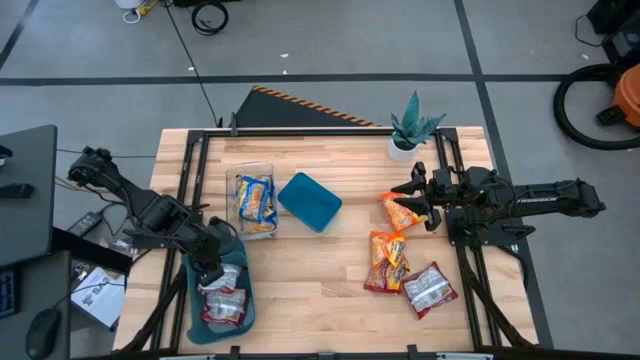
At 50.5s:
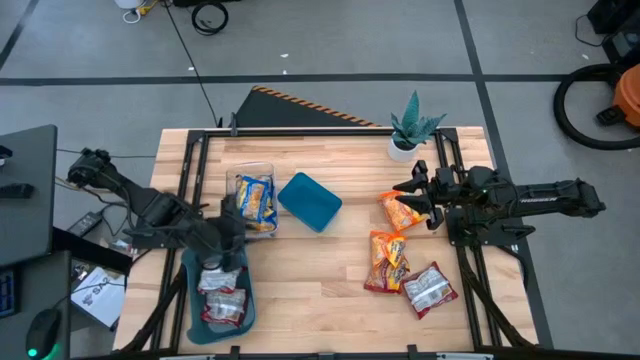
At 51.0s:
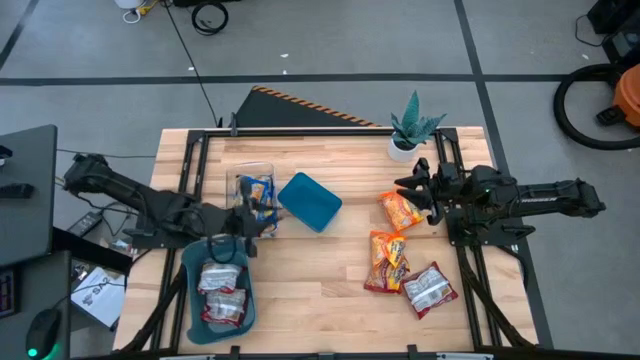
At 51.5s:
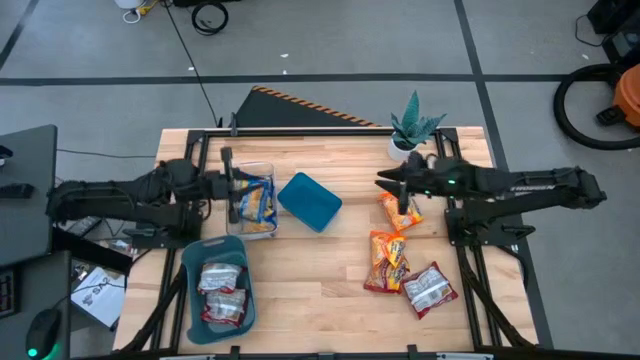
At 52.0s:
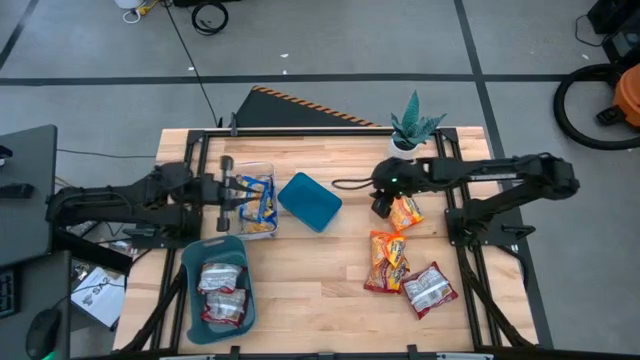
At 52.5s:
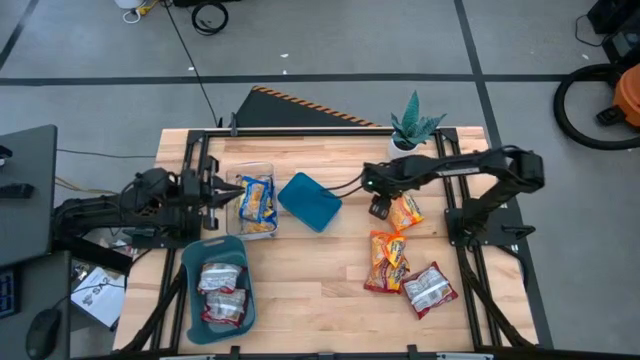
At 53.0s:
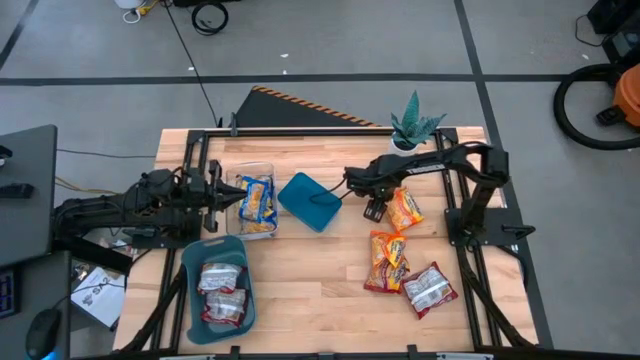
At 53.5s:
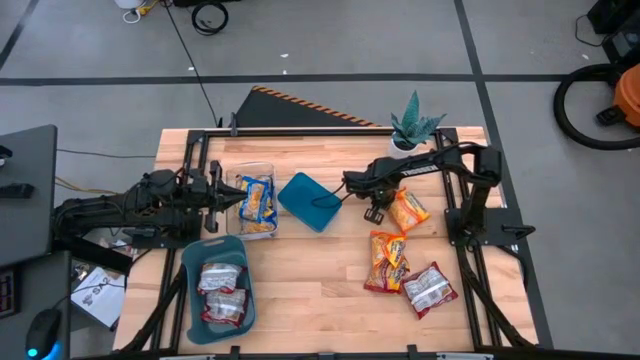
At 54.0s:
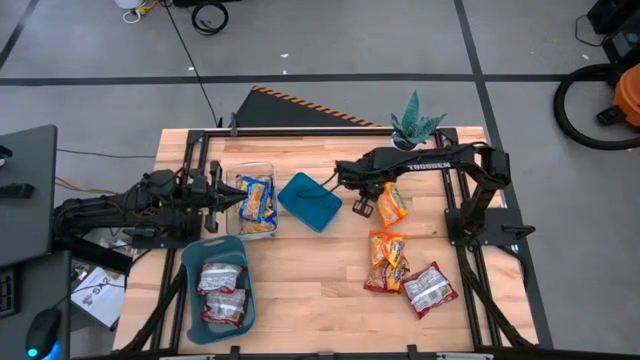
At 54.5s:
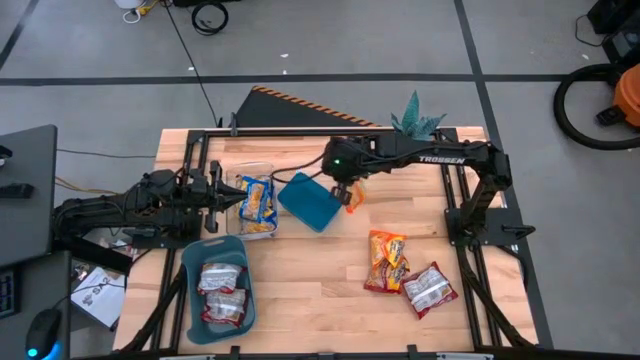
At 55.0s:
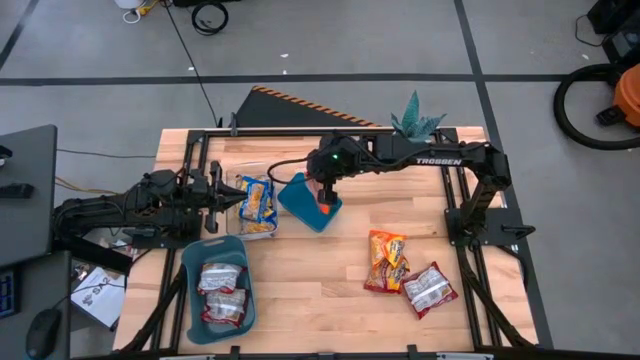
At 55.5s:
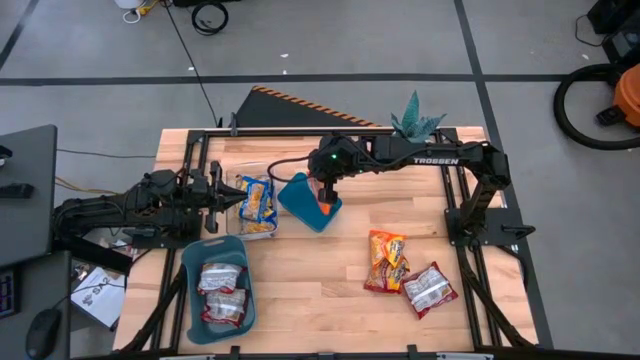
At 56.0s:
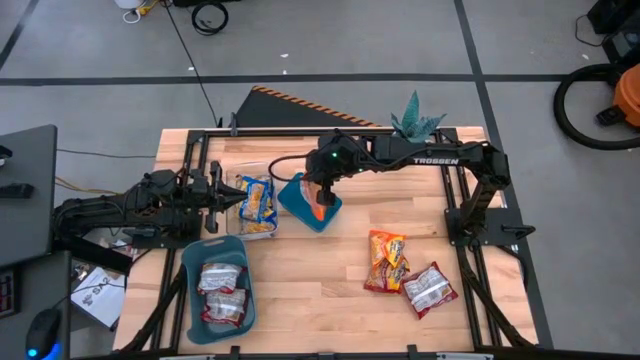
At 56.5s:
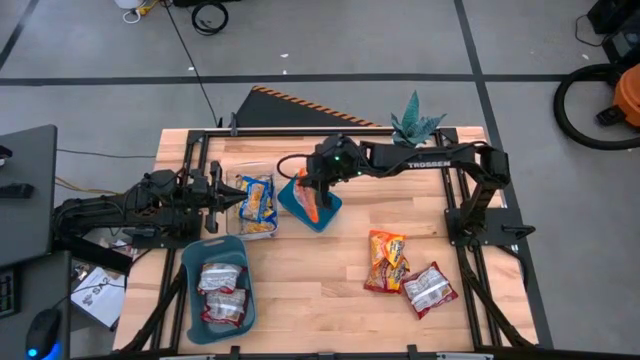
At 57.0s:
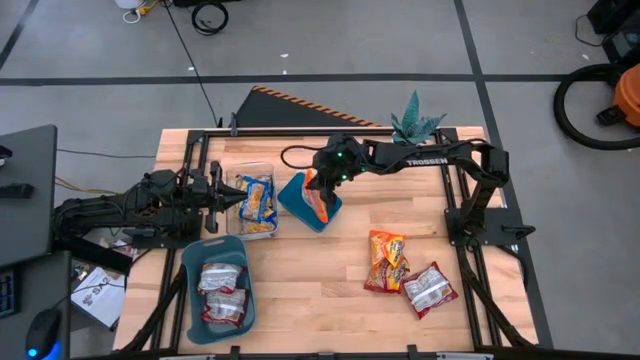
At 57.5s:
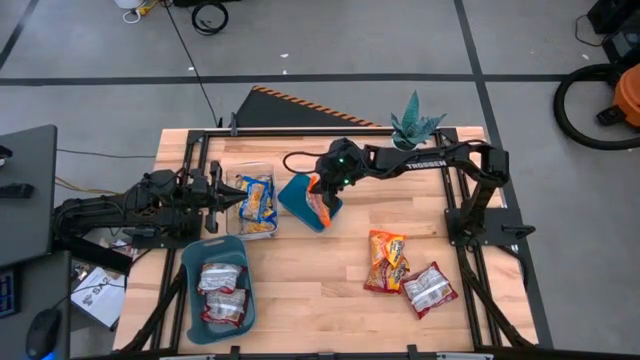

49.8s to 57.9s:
Task: Sort Maruchan noodles
Put the top orange noodle pack into the blue bin

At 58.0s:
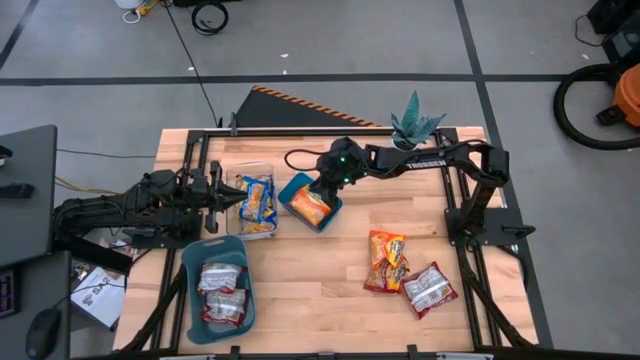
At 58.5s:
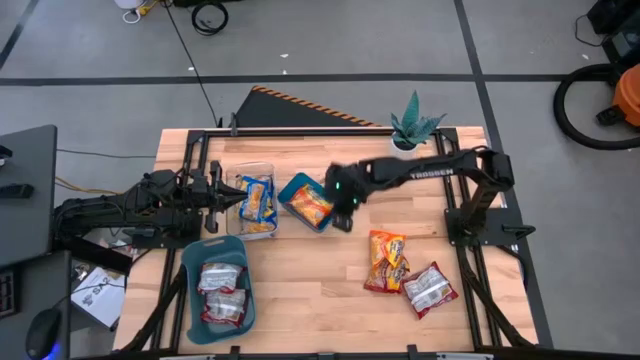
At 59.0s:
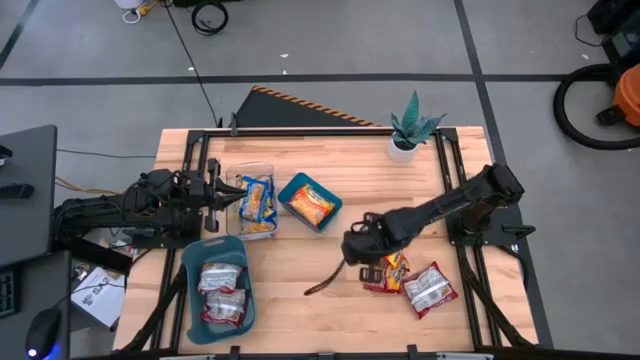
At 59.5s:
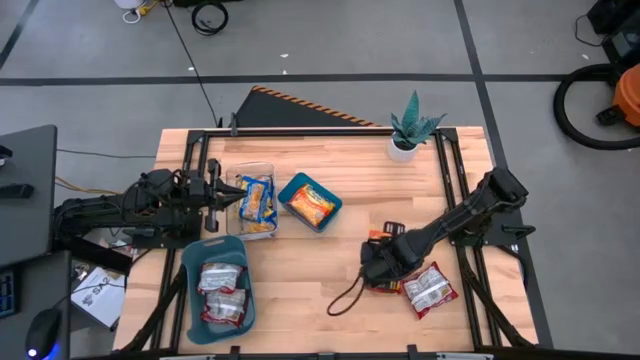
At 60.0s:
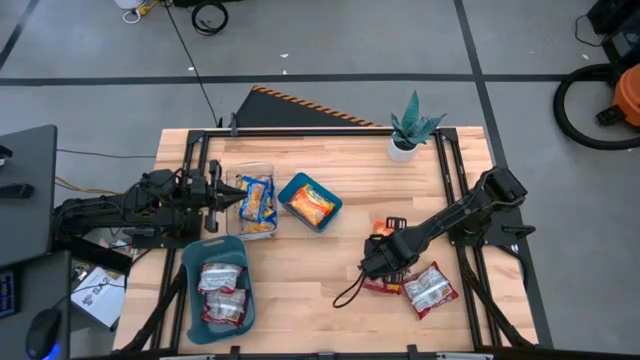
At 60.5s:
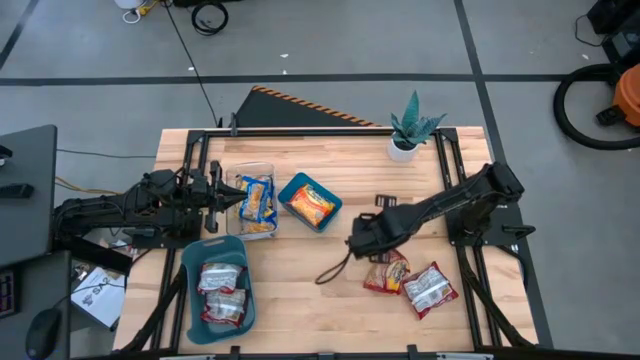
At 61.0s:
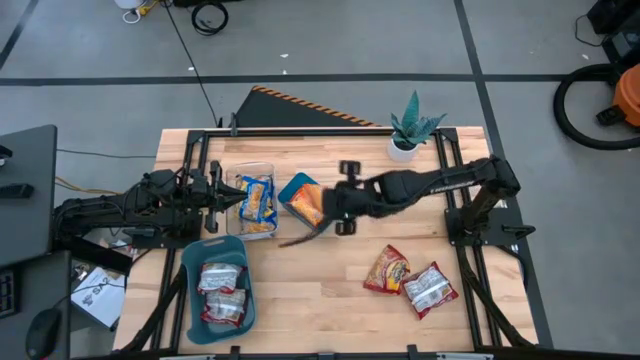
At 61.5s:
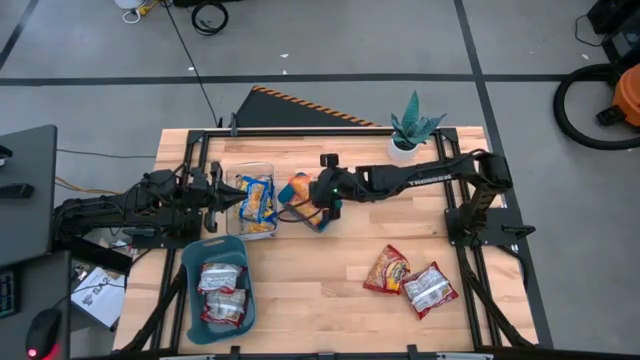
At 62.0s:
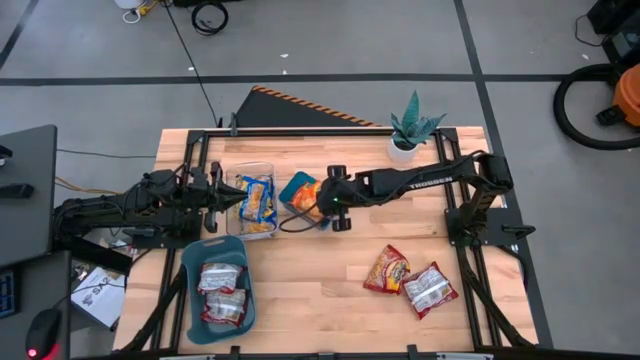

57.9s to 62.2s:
Put the orange noodle pack into the blue bin

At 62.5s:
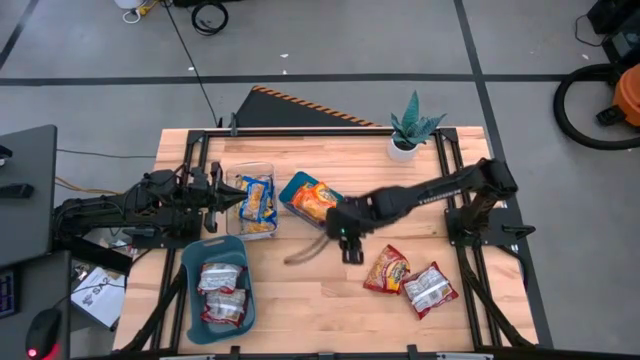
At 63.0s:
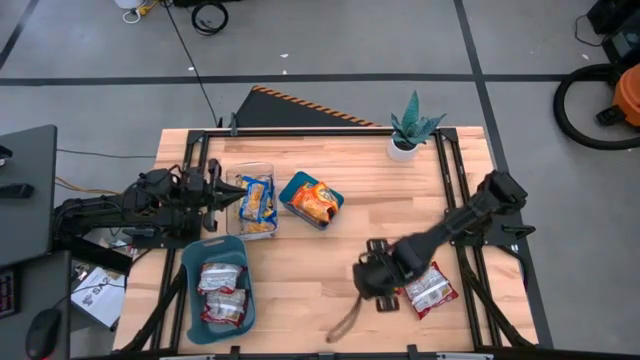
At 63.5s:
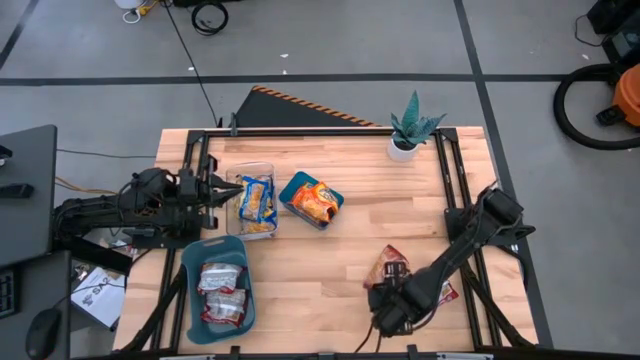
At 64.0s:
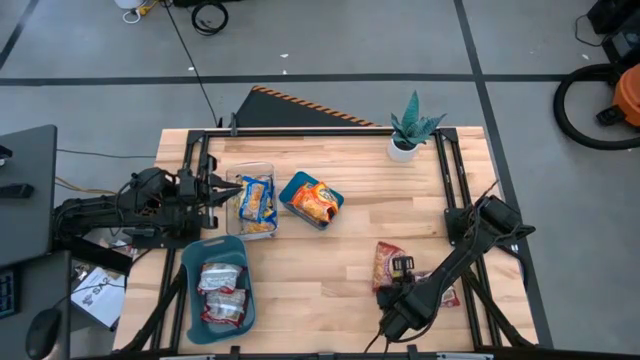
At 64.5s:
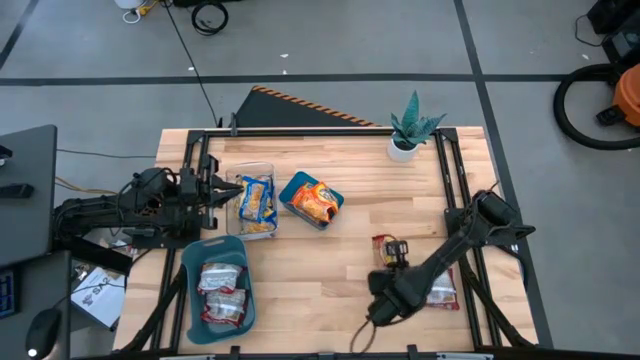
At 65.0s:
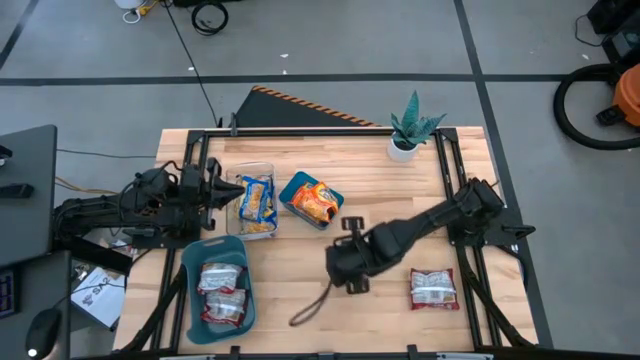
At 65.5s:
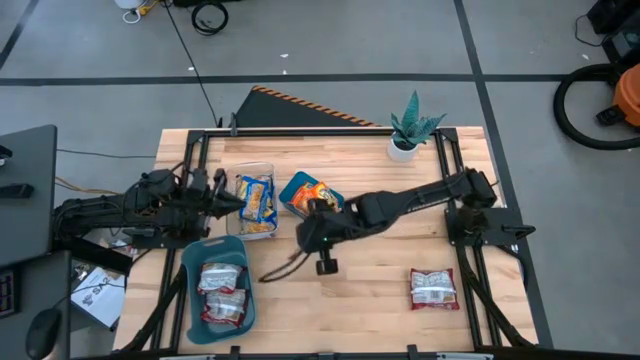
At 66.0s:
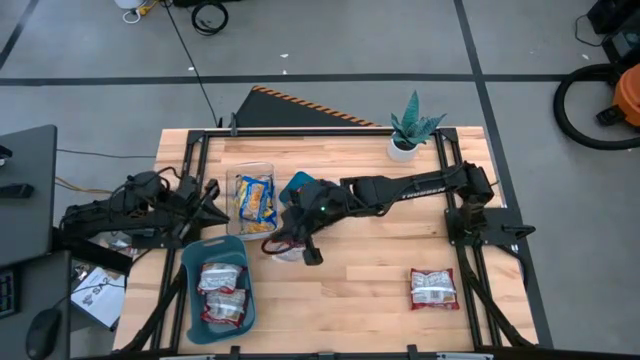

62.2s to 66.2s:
Put the left red noodle pack into the blue bin

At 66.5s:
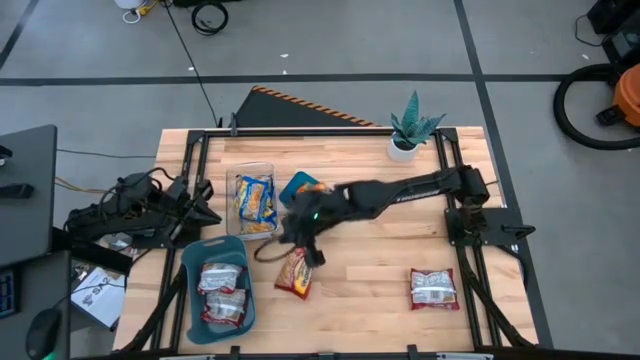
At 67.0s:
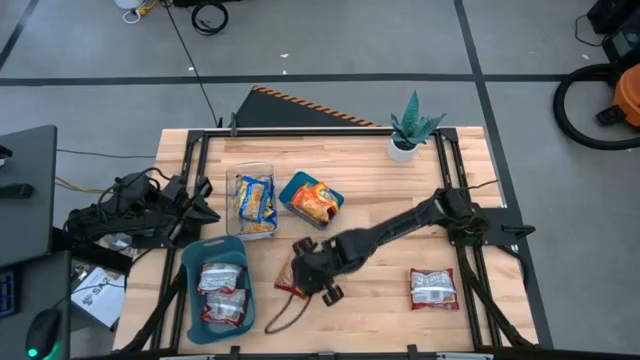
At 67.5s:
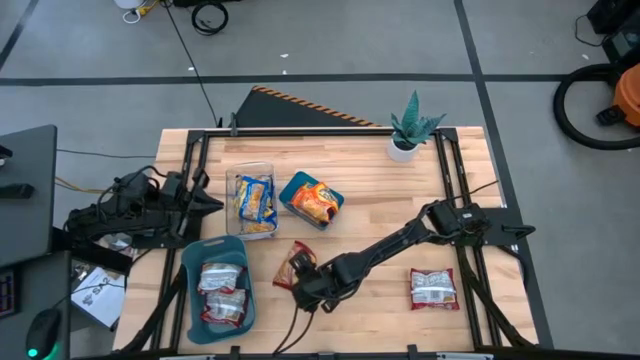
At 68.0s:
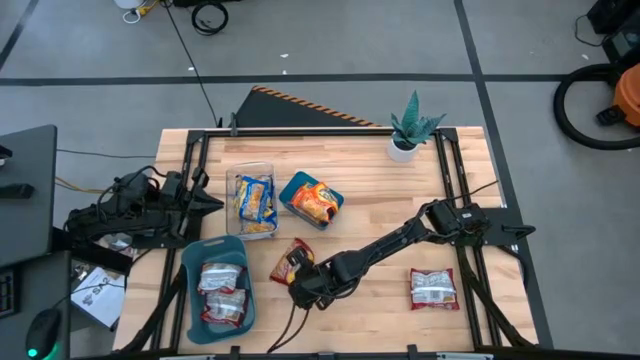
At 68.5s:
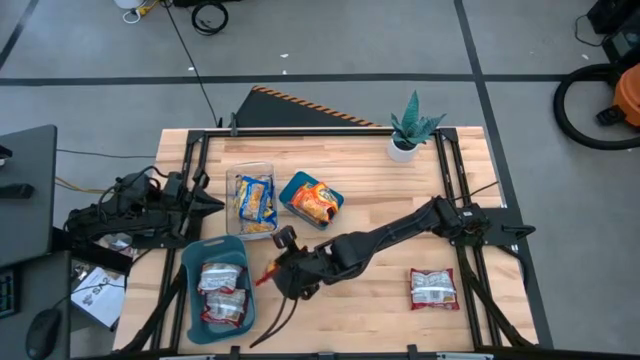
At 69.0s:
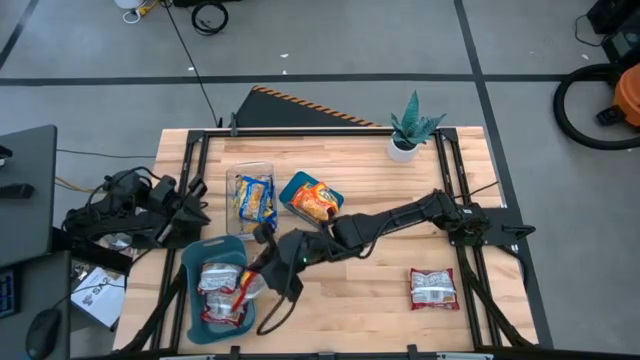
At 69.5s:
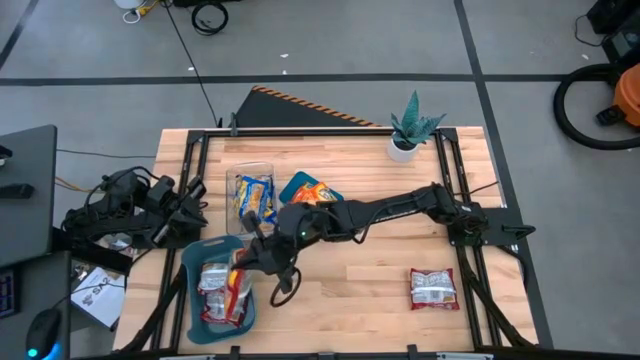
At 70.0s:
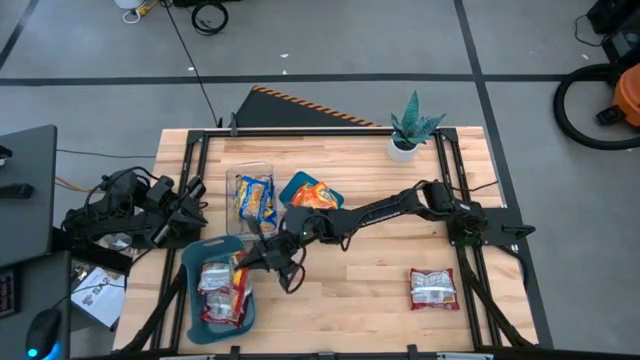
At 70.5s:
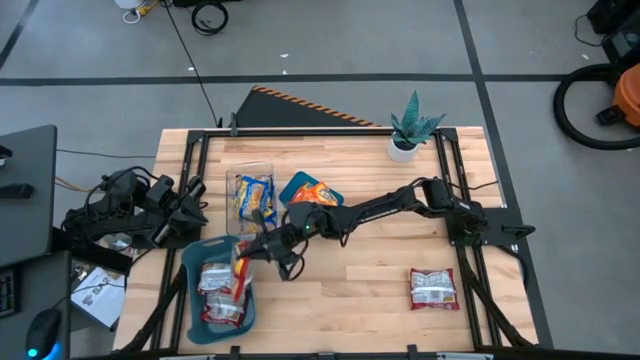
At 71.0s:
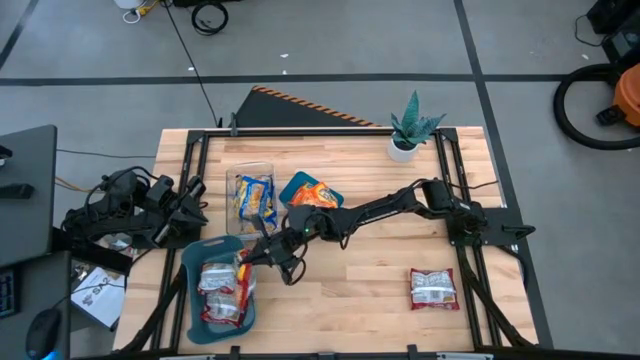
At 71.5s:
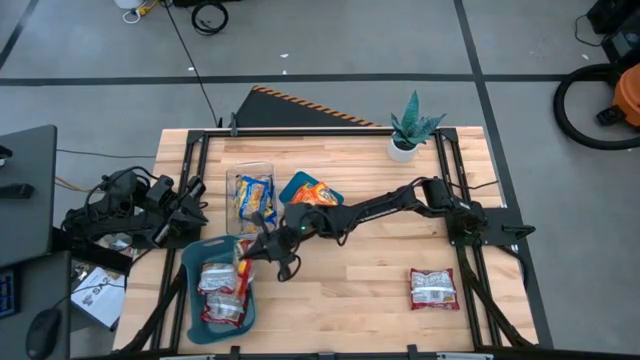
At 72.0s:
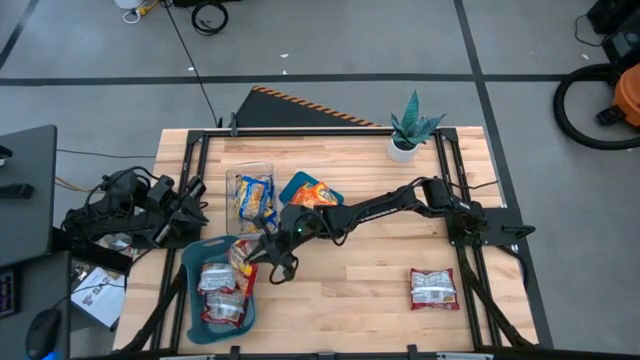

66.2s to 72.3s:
Put the left red noodle pack into the blue bin
